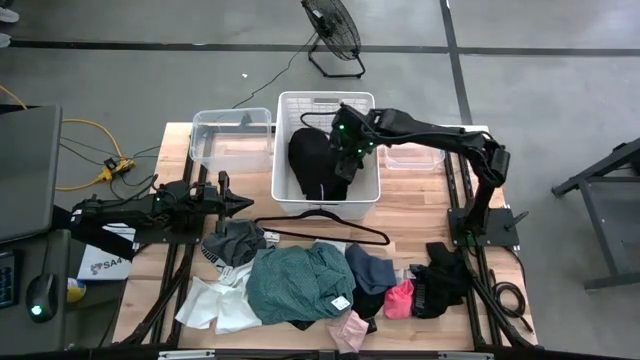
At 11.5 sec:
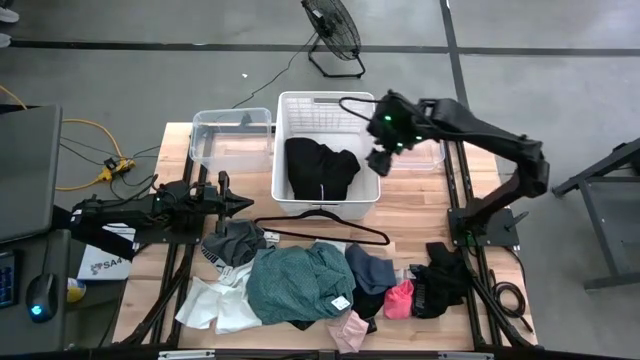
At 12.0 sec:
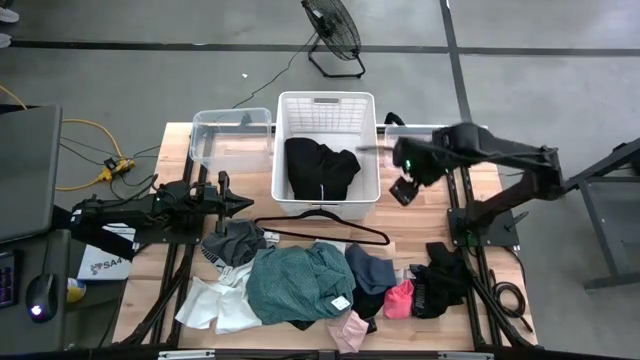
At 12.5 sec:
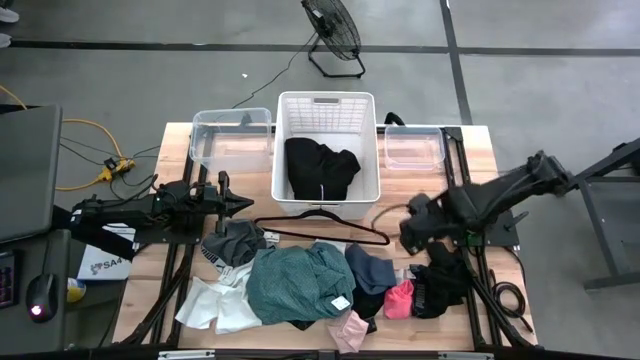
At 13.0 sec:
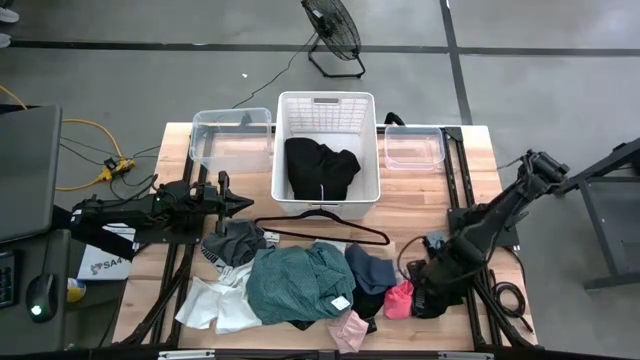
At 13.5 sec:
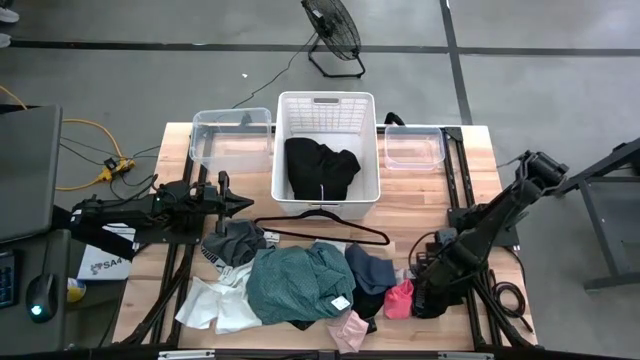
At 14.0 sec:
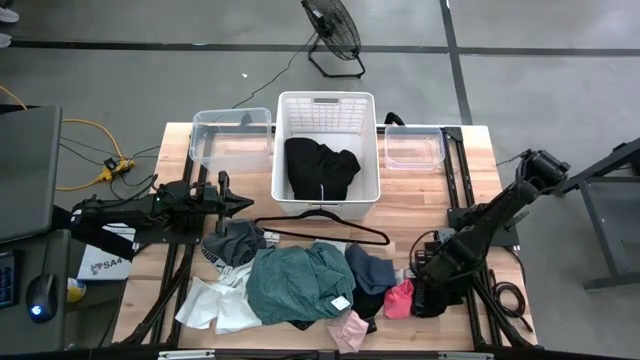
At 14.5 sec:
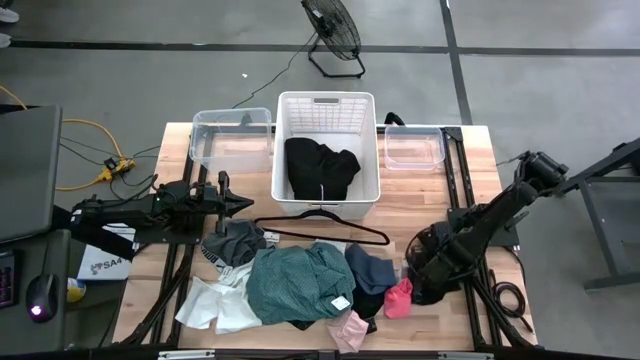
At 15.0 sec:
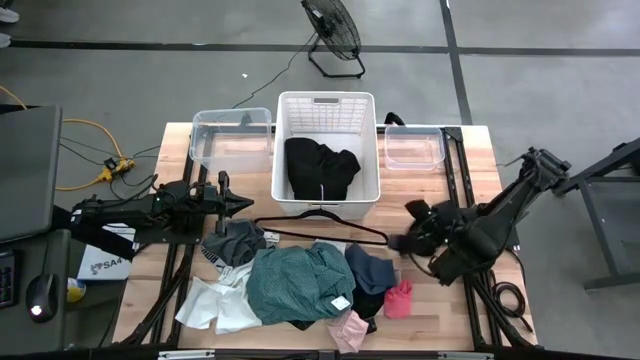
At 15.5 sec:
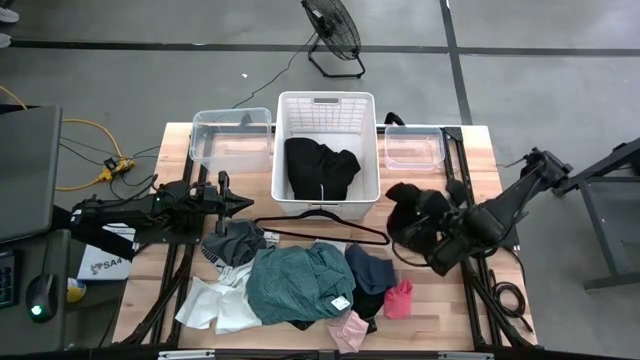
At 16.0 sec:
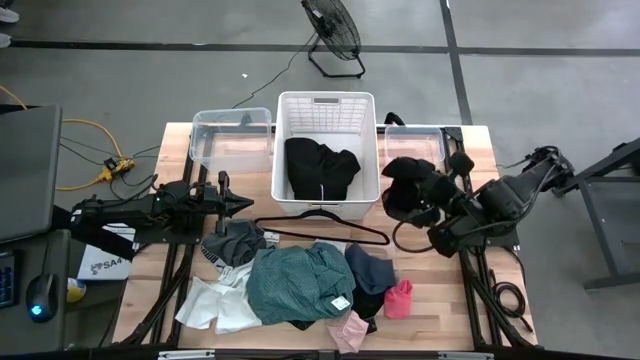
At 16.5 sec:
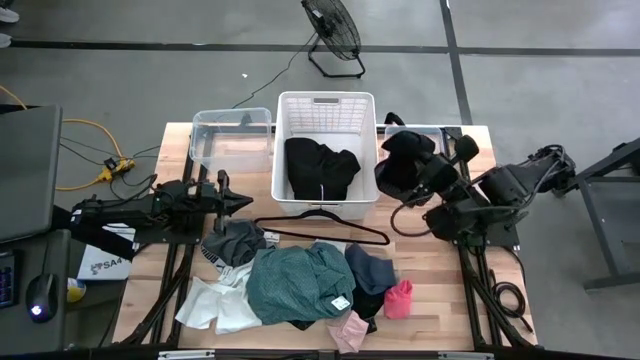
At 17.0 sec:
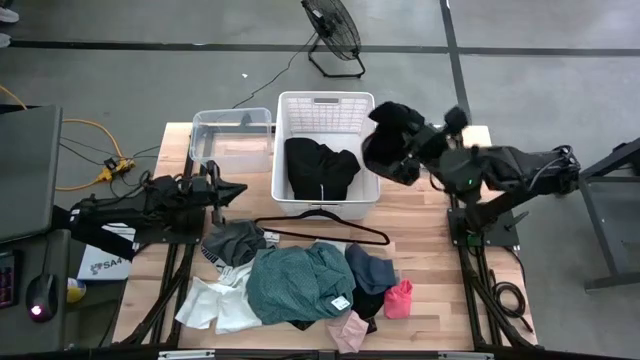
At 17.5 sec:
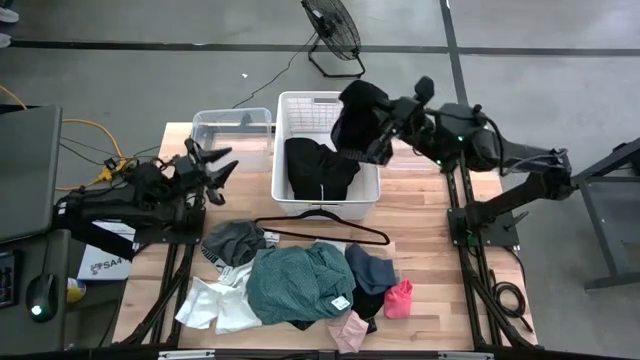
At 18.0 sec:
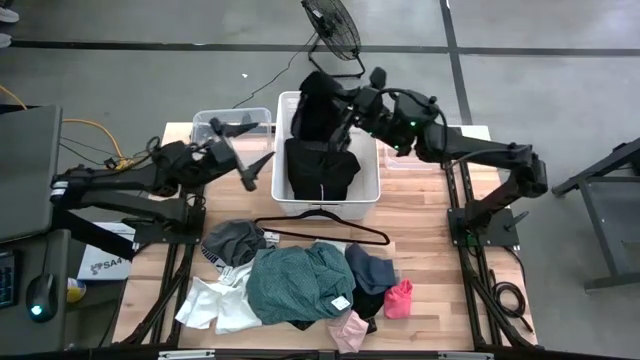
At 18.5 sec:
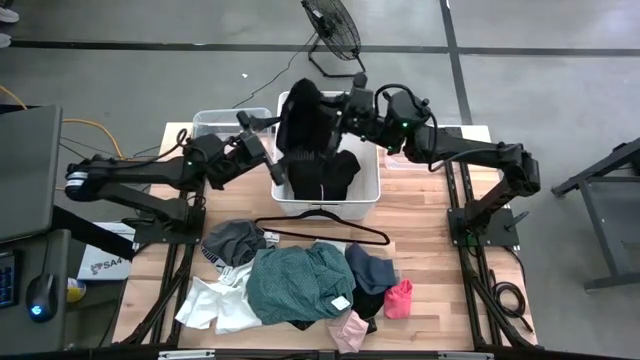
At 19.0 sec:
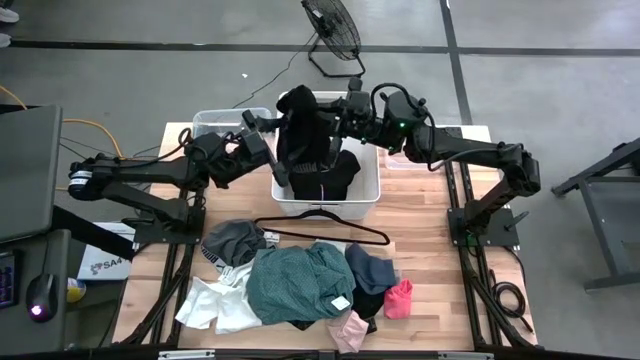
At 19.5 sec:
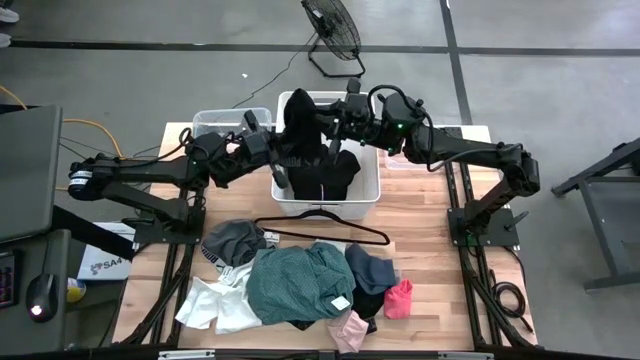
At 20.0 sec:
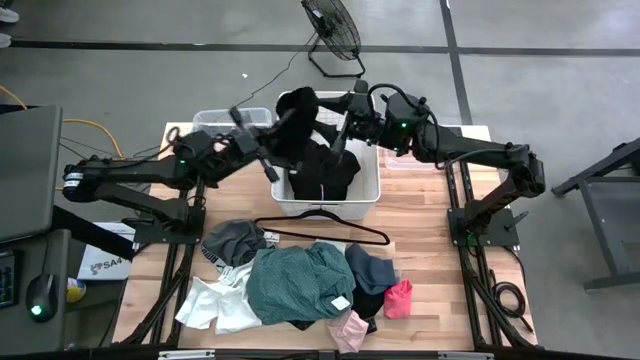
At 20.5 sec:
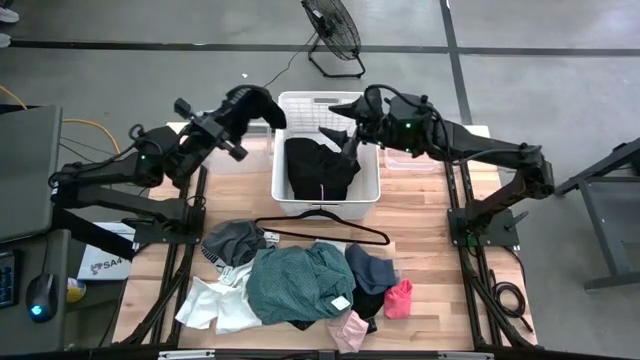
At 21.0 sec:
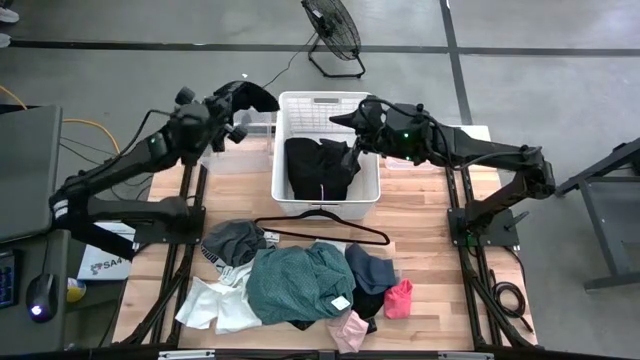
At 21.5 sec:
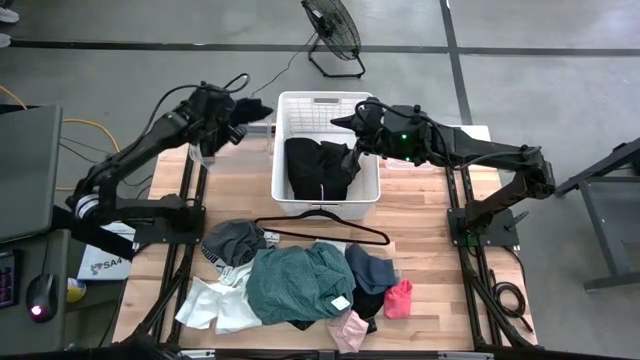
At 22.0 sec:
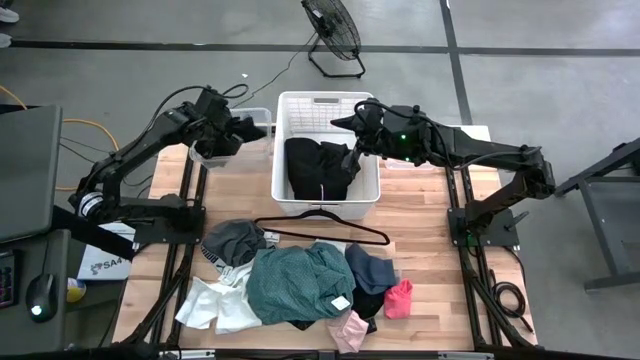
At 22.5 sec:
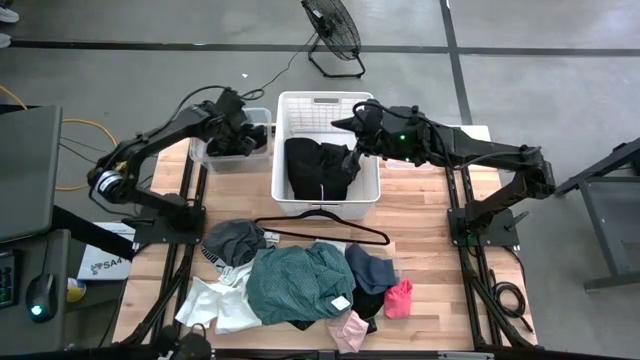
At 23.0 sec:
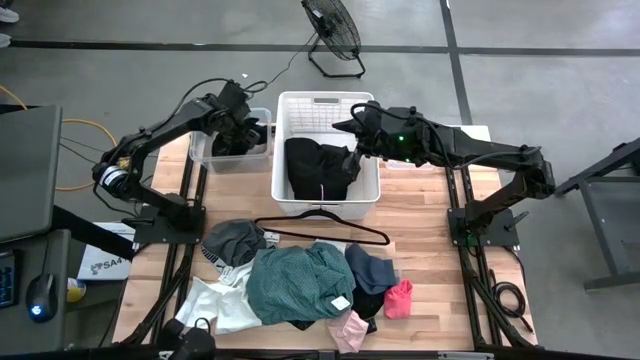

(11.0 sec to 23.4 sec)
Task: Pick & Place Cloths
Put the black boxer shorts into the left transparent bin

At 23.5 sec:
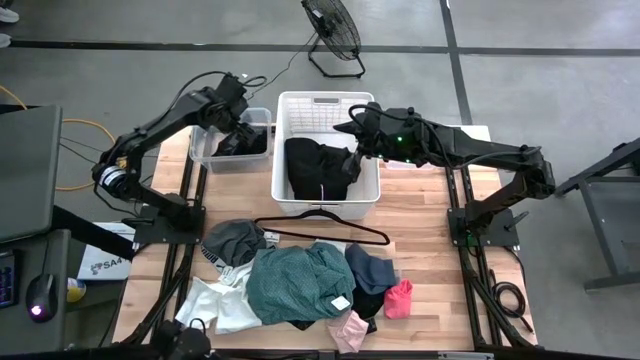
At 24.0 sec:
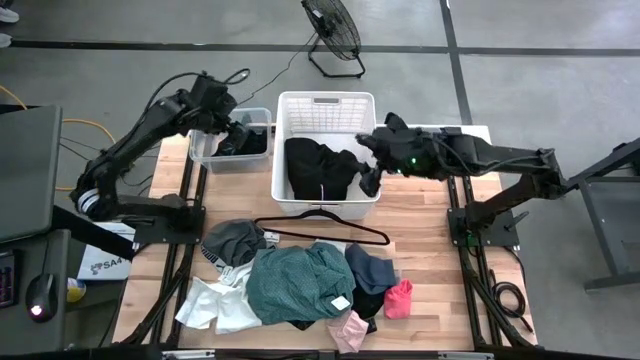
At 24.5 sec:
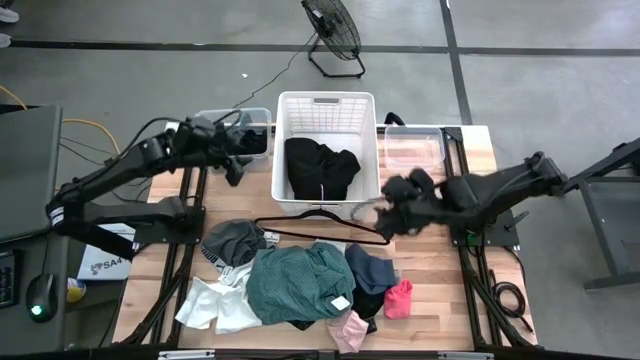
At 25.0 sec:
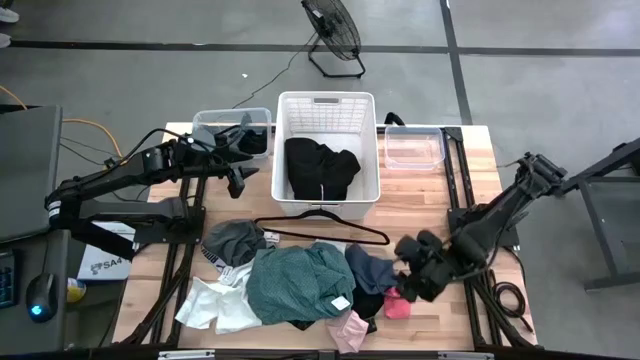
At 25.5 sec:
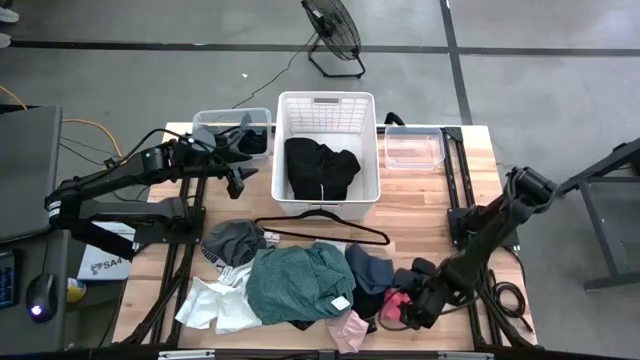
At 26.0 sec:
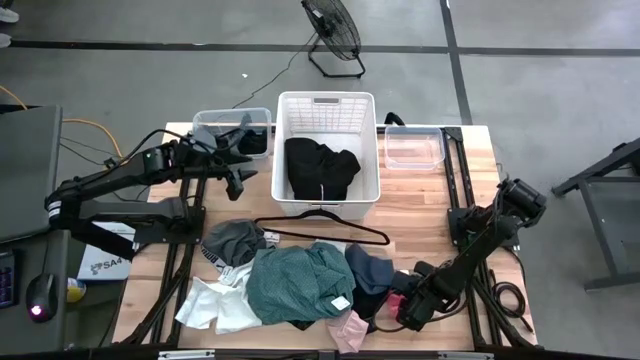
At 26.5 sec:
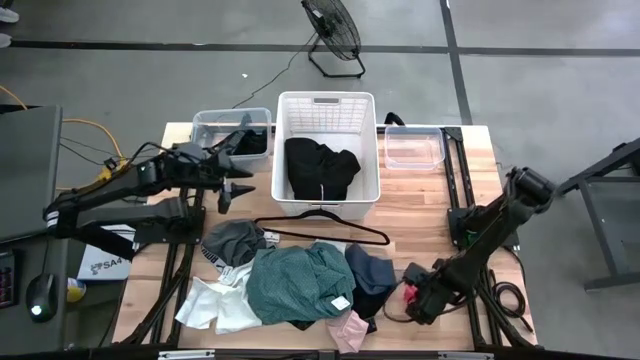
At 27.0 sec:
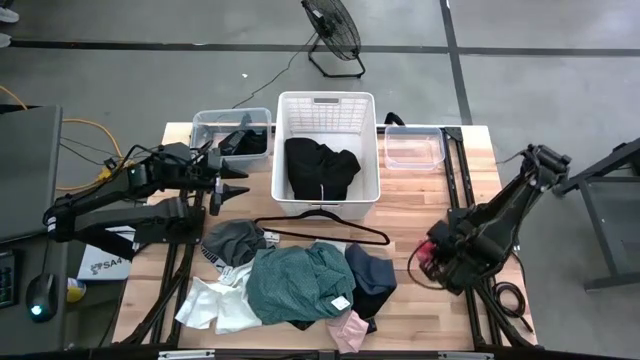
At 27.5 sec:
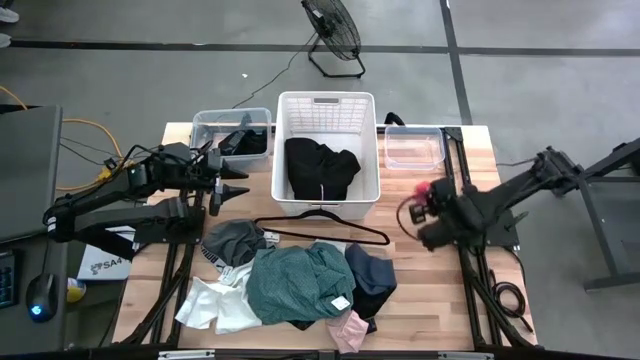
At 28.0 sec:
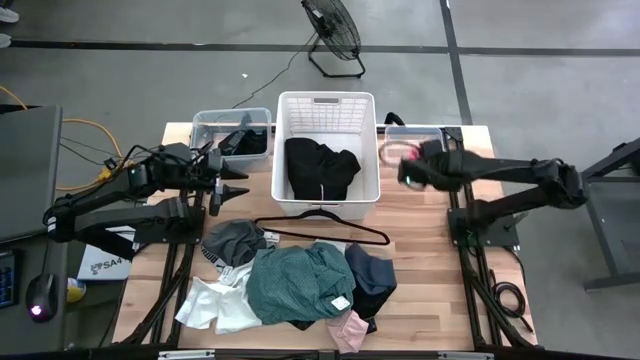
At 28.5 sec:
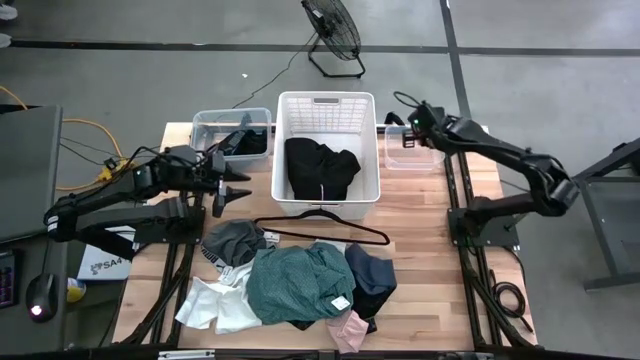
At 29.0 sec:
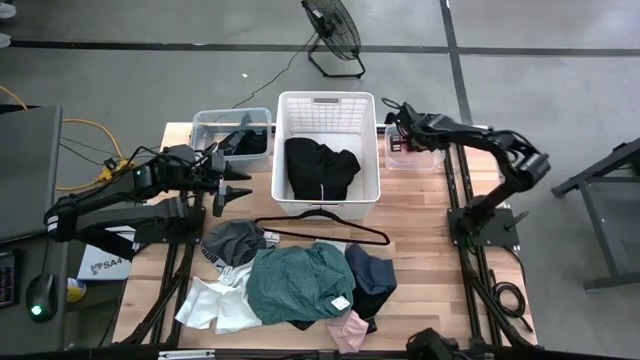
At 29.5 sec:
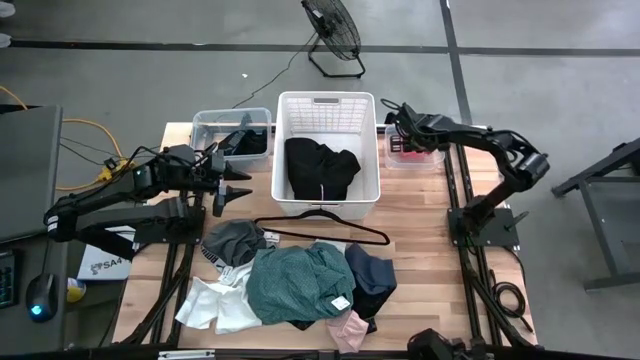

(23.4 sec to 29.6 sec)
Put the orange sock into the right transparent bin

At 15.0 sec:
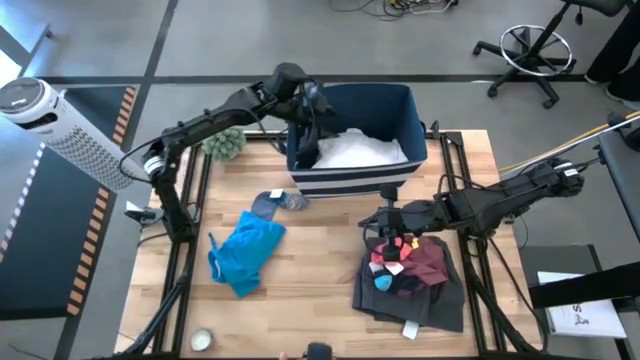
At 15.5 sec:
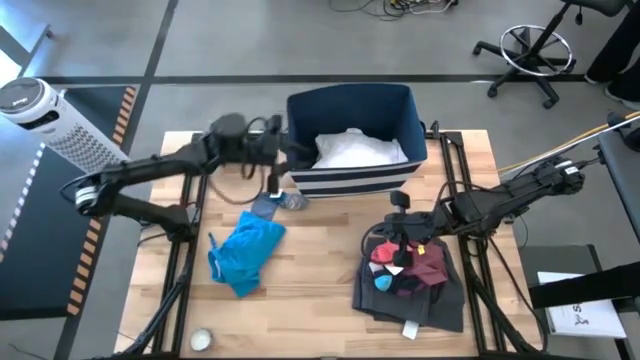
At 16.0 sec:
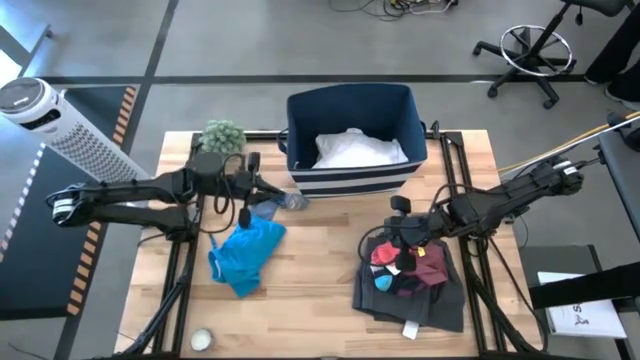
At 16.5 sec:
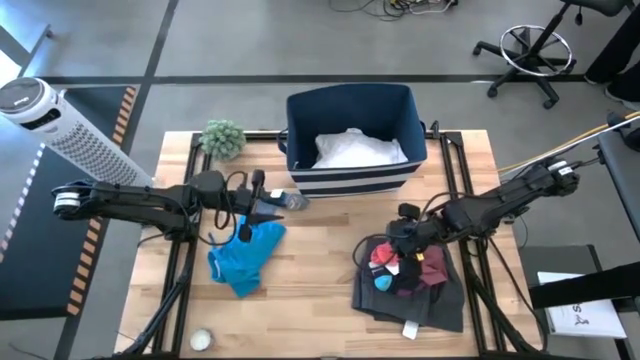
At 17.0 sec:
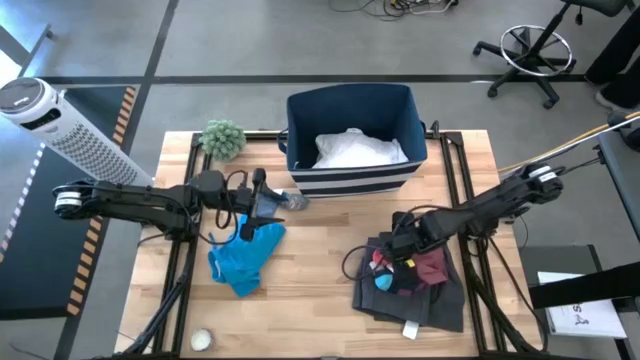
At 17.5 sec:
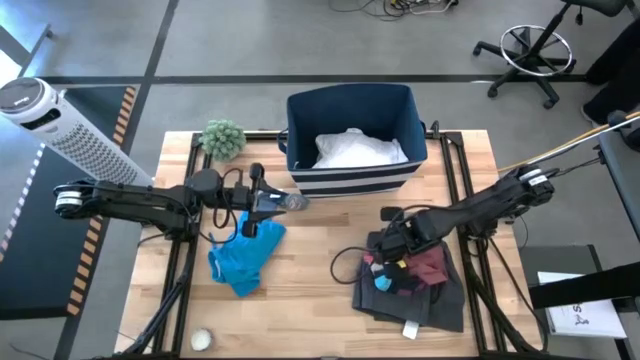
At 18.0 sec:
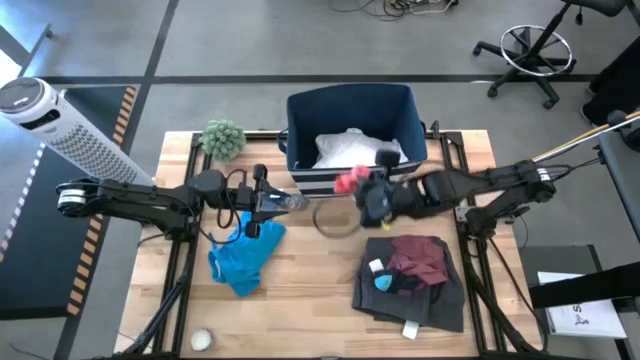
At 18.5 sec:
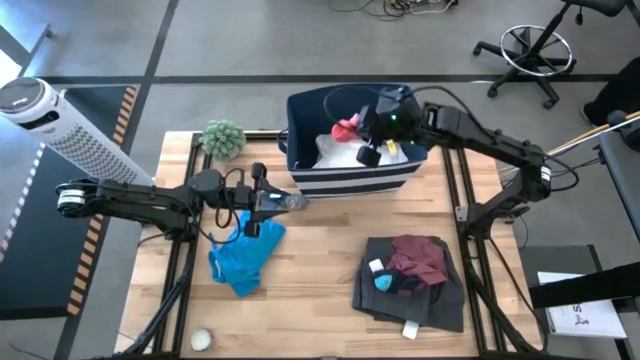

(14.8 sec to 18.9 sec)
Task: Sort clothes
Put the pink pair of socks into the blue laundry bin
